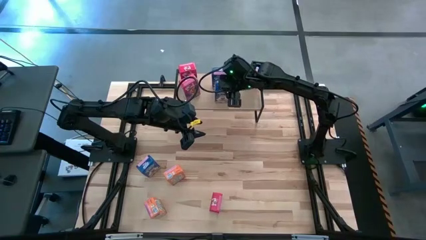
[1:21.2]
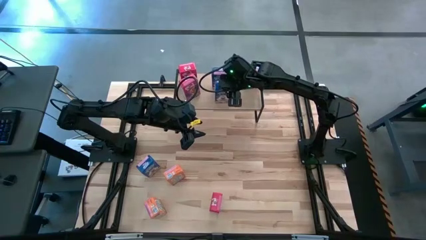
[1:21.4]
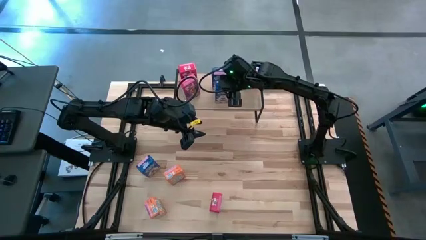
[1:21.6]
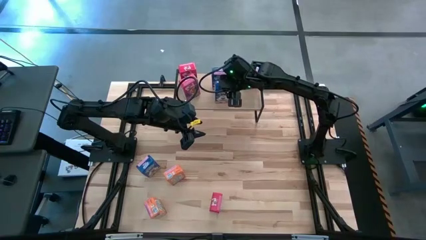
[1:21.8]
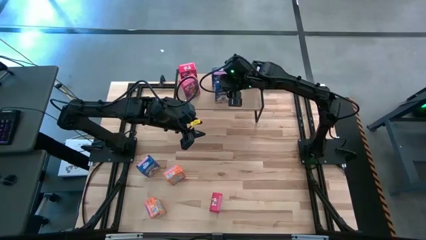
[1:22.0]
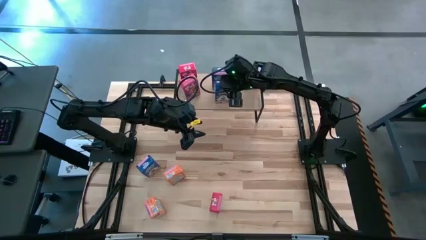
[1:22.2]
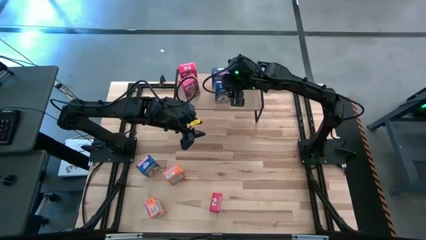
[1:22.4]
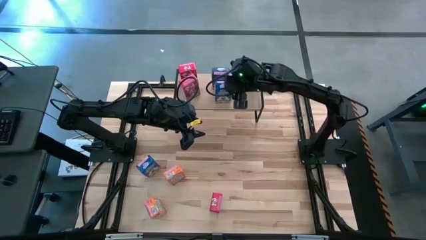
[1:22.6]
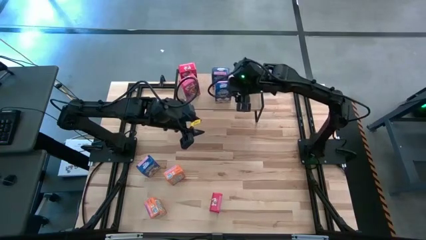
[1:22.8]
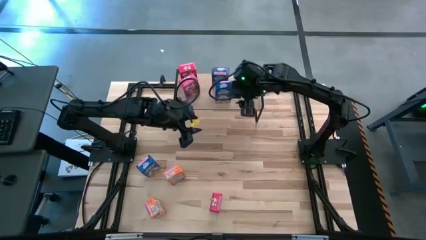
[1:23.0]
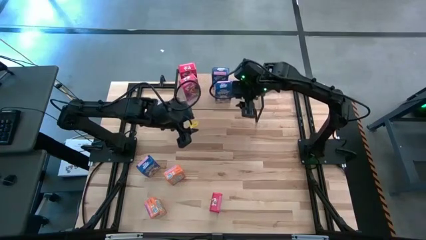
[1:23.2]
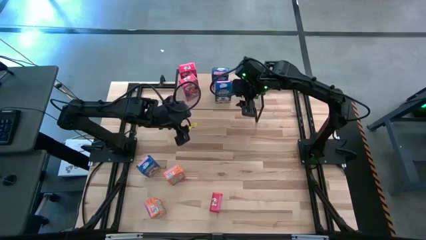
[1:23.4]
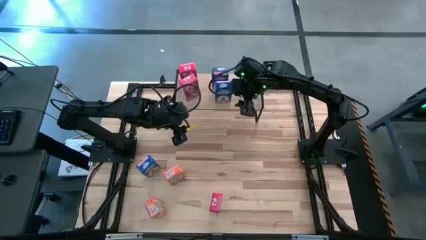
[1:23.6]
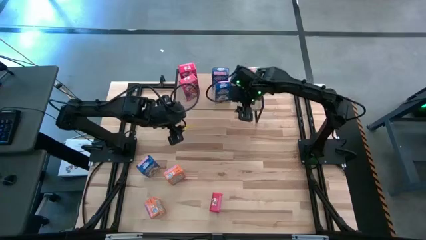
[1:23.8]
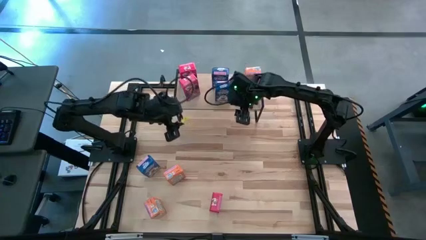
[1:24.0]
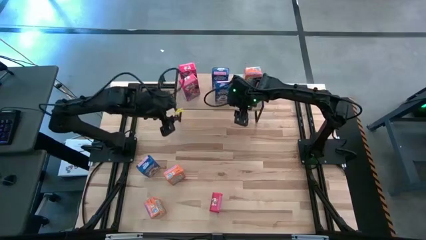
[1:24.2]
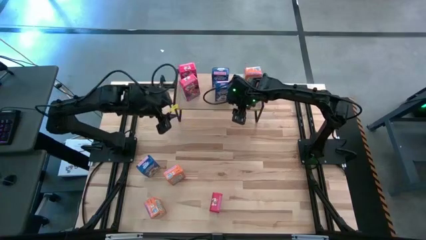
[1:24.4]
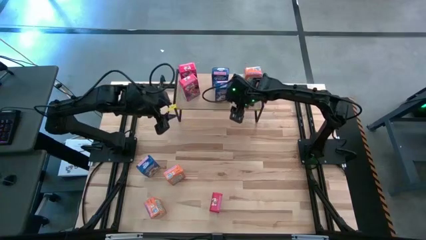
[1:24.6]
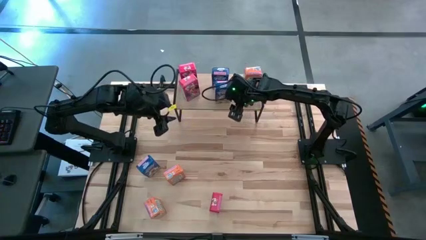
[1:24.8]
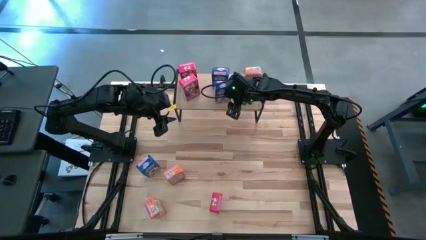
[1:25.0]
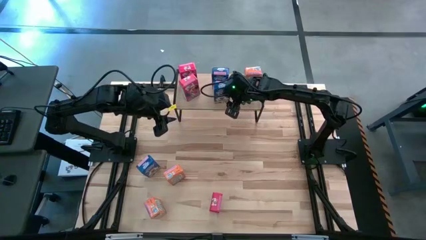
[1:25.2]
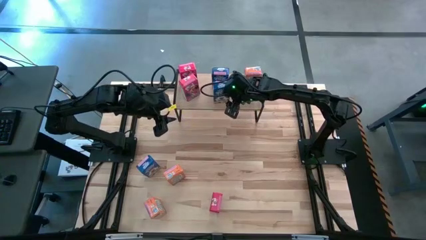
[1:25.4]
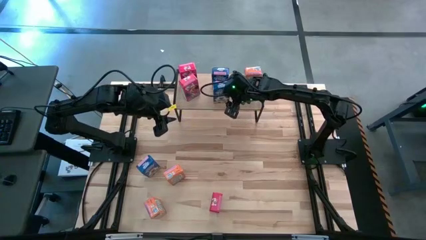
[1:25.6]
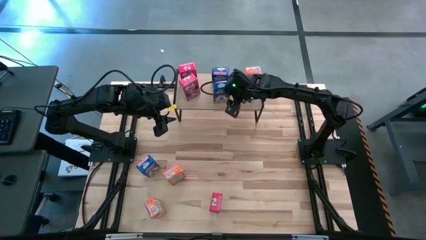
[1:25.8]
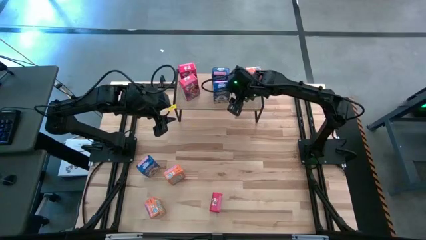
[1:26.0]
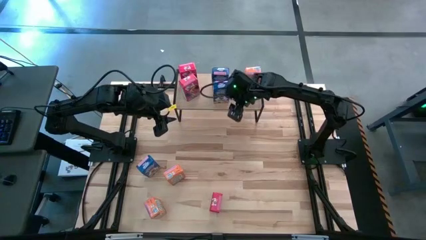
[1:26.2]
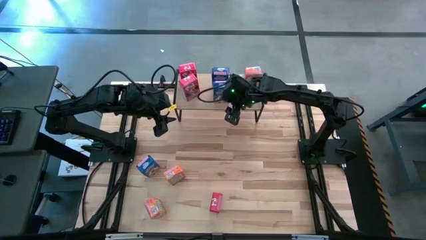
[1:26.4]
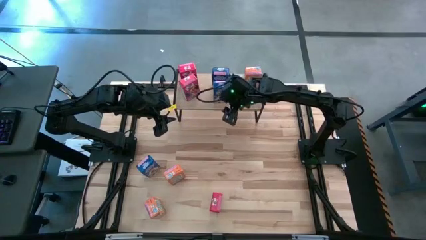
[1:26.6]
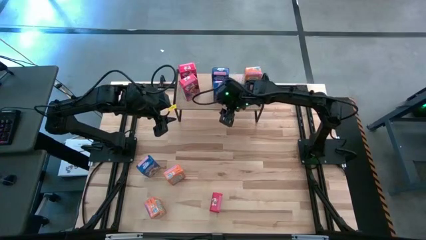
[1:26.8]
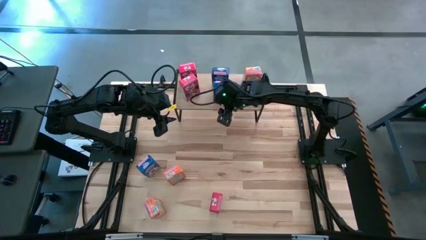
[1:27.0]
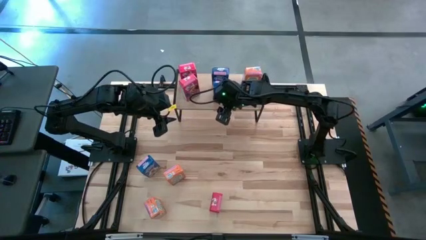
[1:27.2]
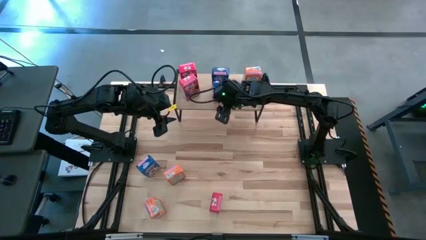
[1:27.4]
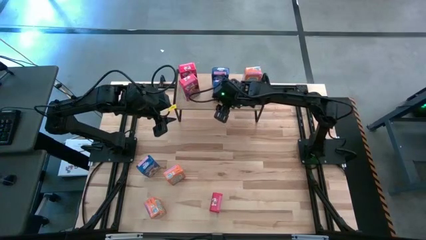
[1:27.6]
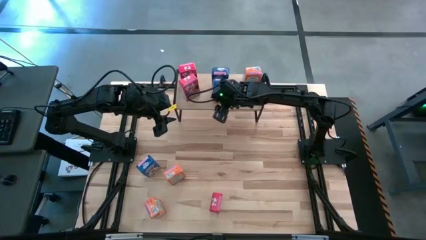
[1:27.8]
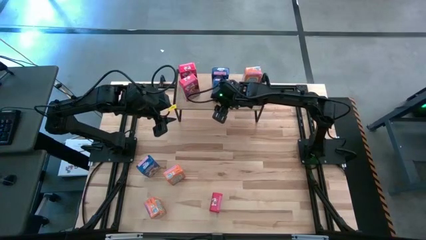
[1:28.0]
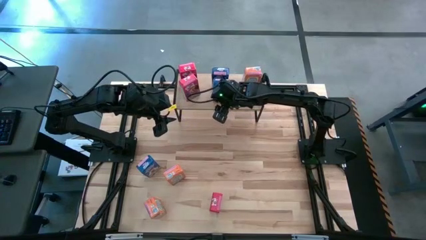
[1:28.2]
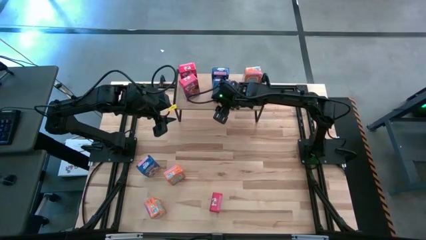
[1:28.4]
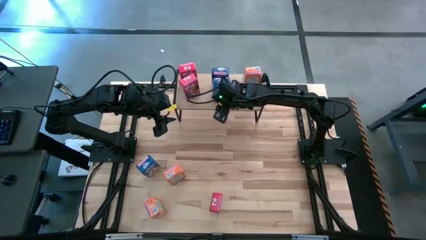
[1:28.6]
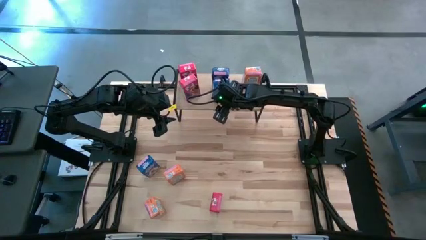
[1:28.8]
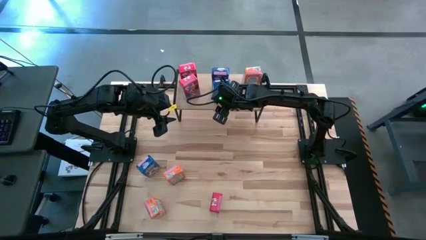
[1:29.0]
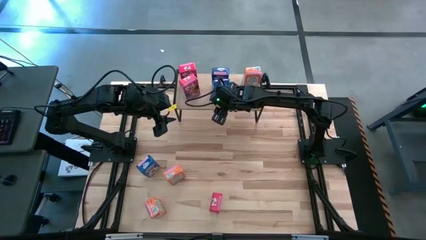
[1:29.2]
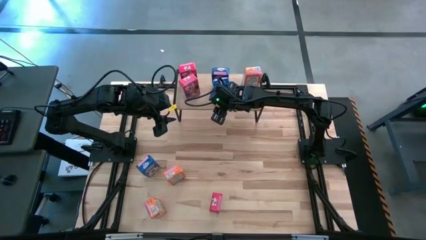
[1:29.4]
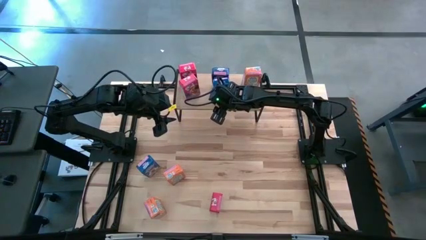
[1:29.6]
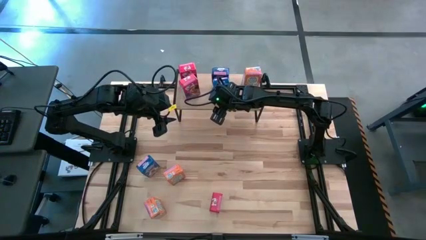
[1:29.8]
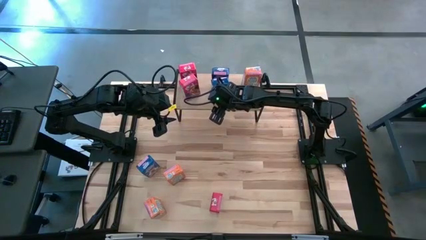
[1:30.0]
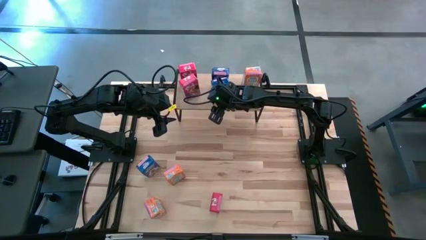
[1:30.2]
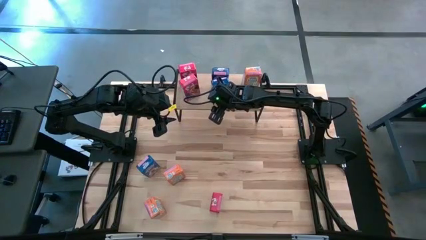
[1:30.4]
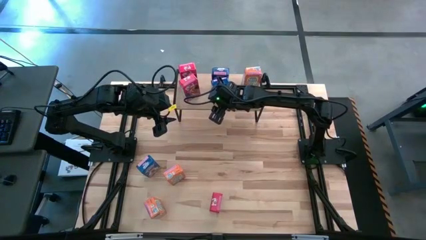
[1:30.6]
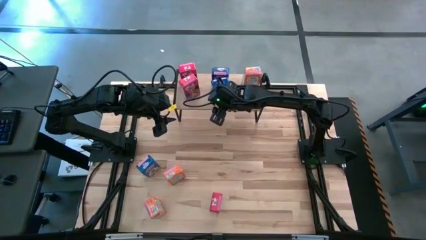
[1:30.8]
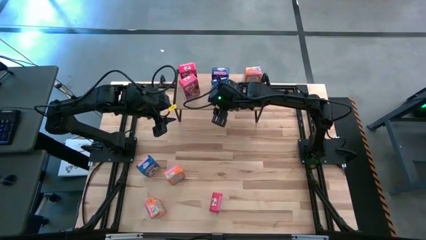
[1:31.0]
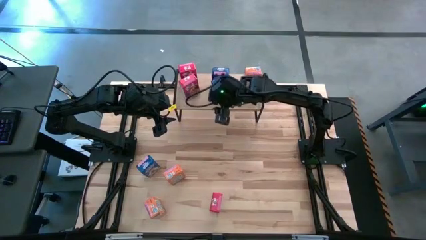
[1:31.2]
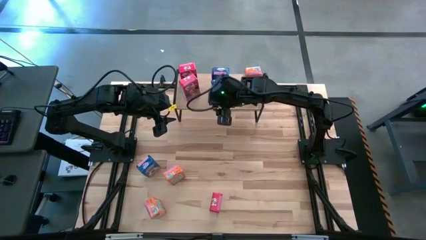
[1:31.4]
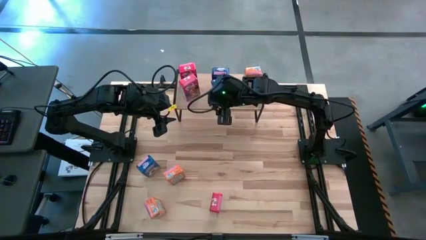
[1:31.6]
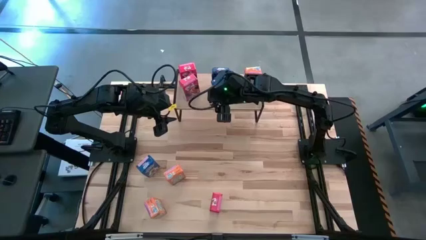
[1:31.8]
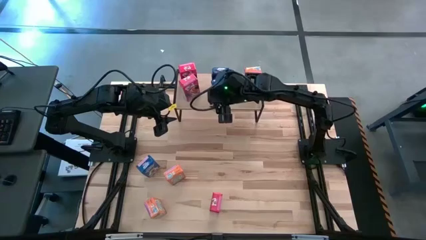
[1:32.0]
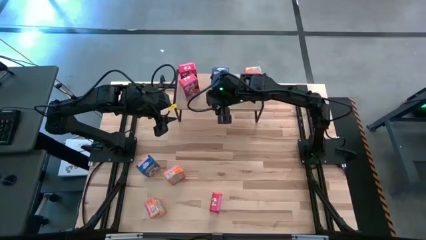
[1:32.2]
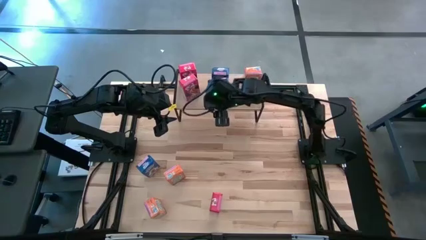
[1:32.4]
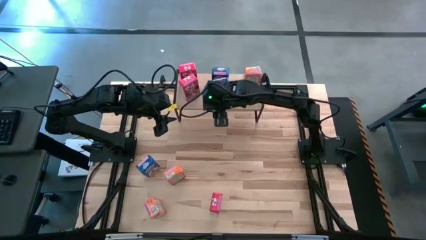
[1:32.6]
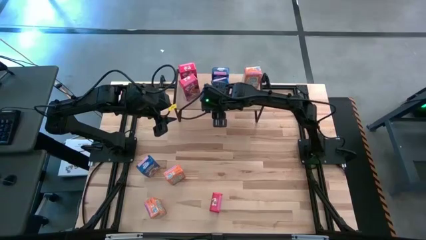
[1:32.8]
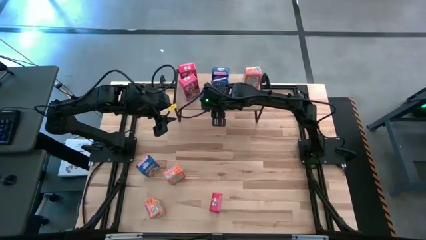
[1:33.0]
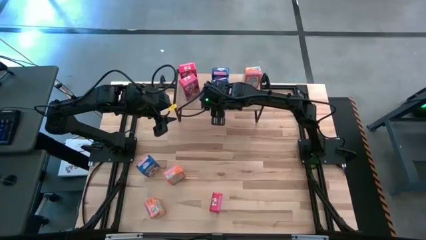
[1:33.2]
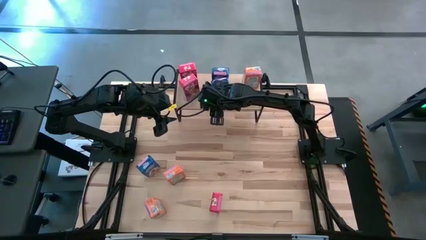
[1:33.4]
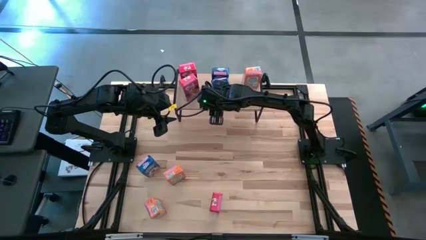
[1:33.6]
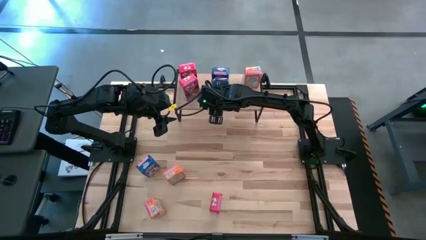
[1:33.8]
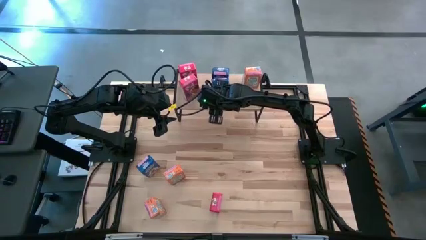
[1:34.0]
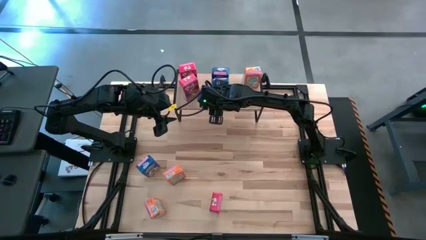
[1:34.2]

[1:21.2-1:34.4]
Task: Stack cereal on shelf
Put the right blue cereal box on the shelf aligned with the other blue cereal box

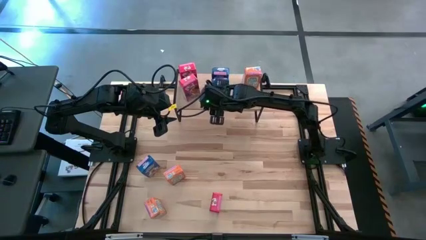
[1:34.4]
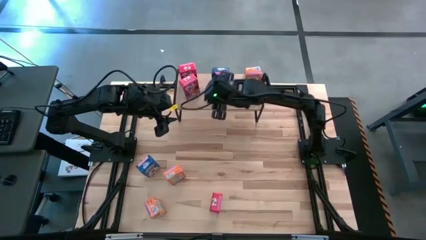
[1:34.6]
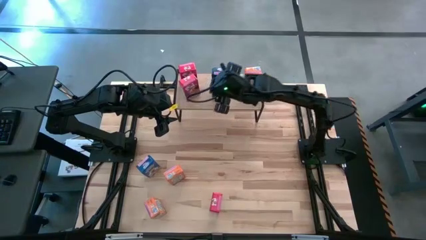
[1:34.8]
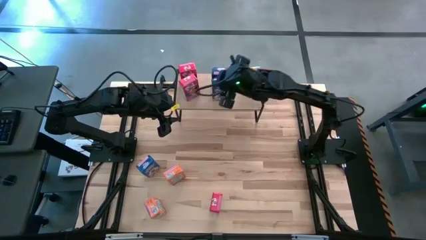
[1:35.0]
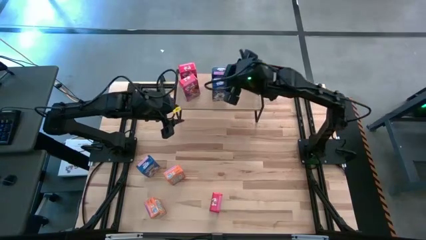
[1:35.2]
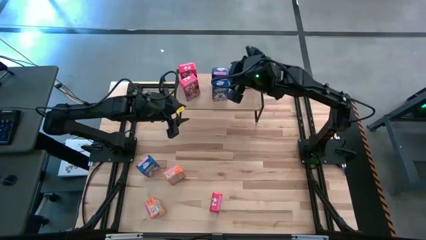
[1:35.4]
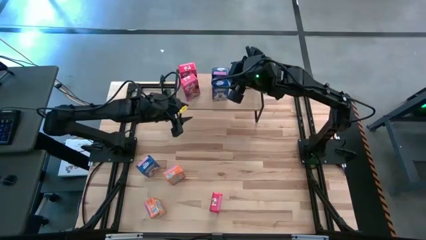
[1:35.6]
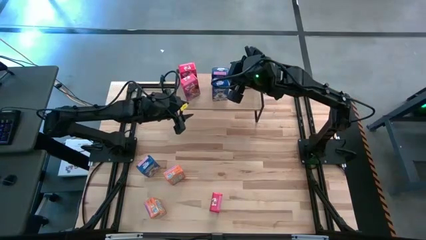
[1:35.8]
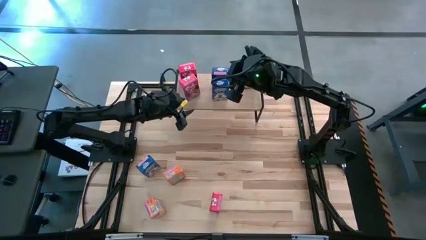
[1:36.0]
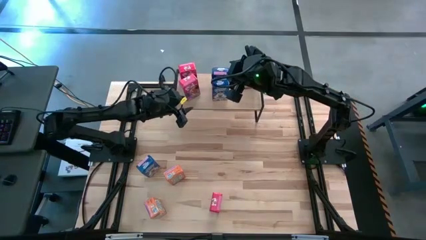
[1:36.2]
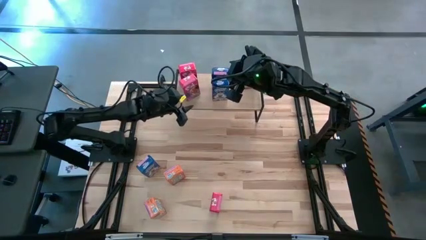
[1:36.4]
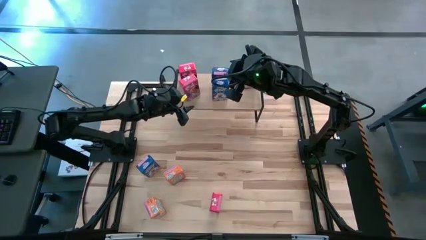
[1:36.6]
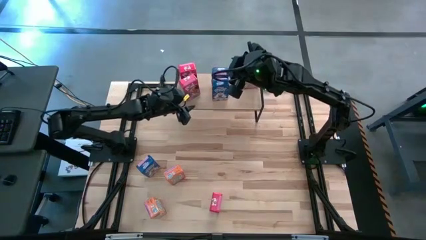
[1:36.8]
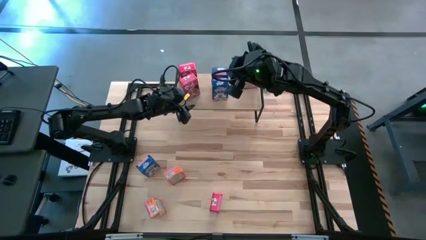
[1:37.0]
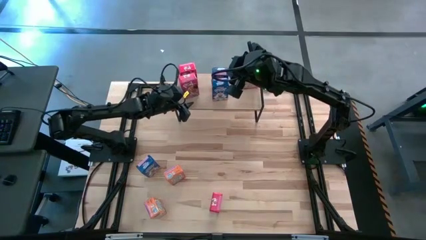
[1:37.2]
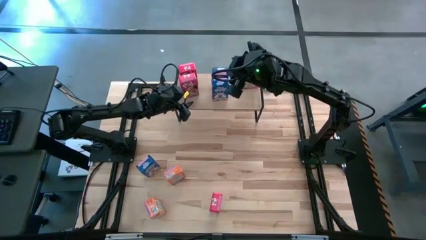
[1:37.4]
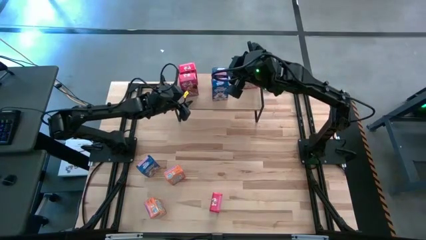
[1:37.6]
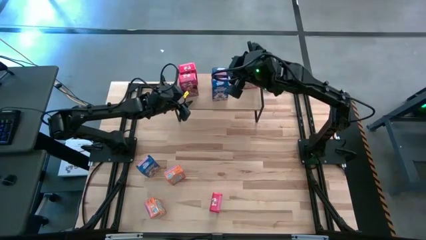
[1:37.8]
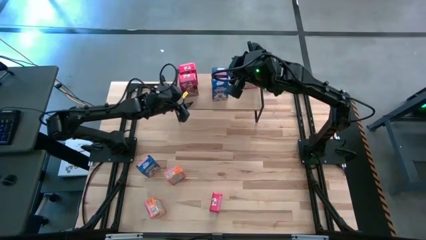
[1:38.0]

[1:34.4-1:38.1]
Adjust the red cereal box on the shelf
